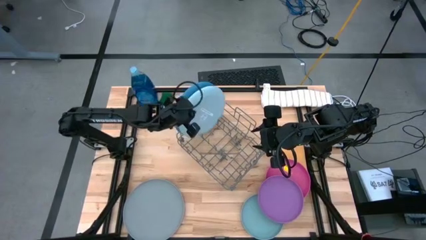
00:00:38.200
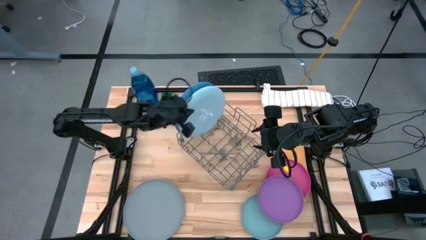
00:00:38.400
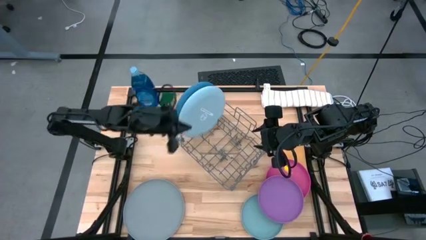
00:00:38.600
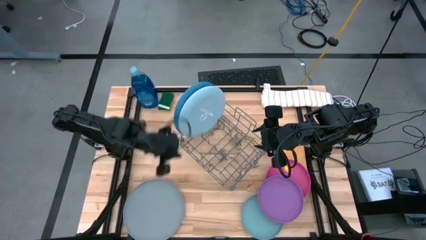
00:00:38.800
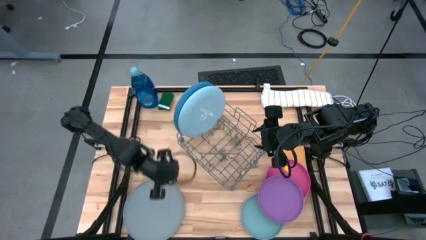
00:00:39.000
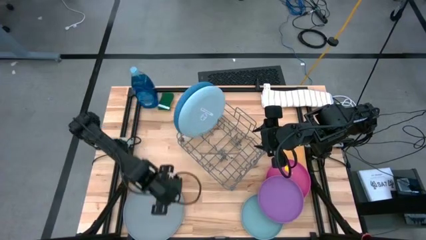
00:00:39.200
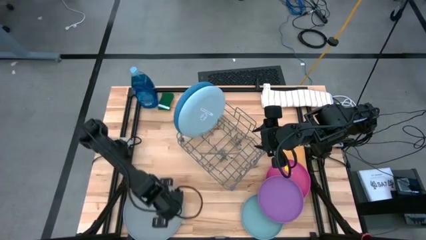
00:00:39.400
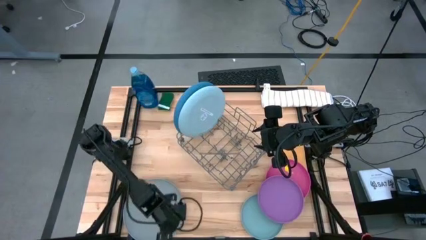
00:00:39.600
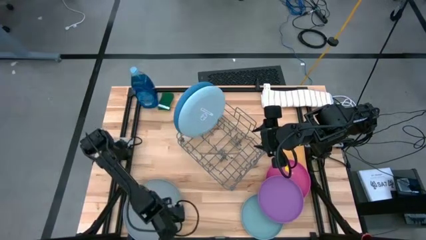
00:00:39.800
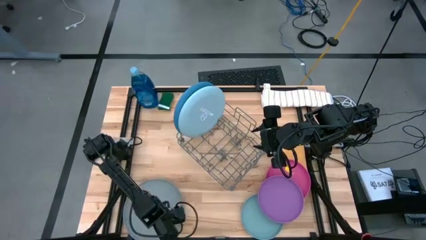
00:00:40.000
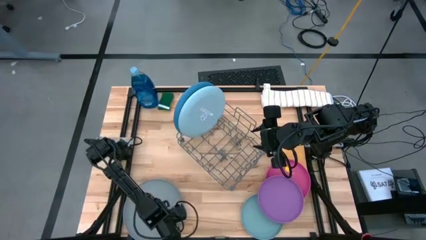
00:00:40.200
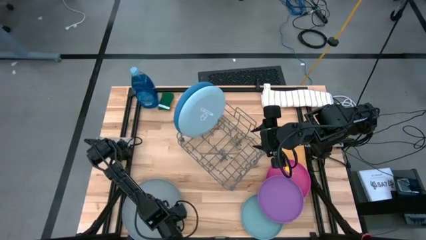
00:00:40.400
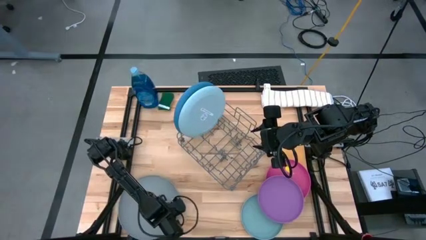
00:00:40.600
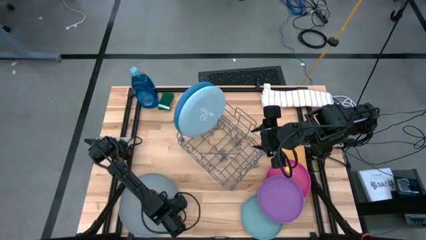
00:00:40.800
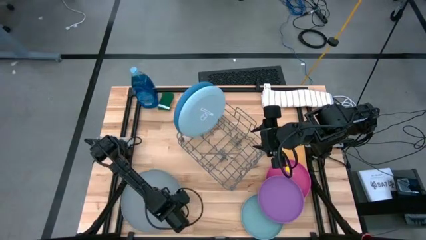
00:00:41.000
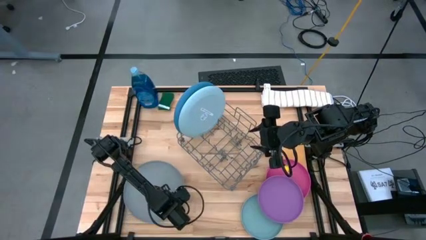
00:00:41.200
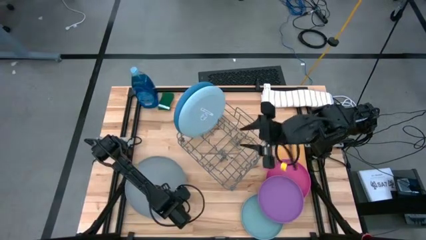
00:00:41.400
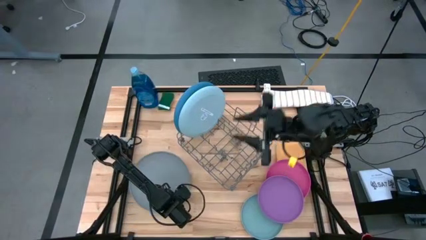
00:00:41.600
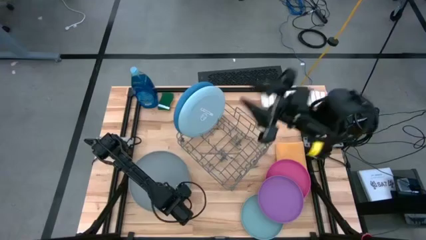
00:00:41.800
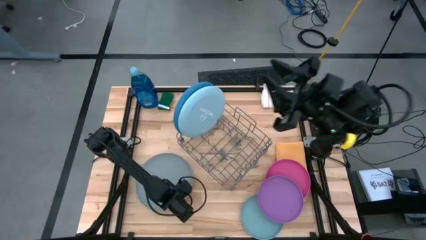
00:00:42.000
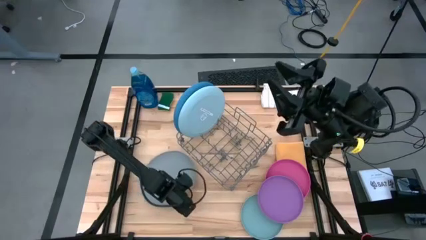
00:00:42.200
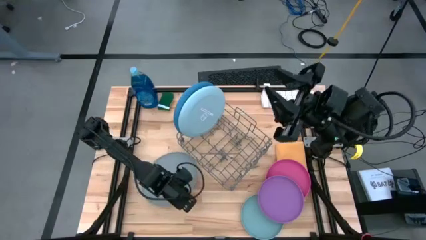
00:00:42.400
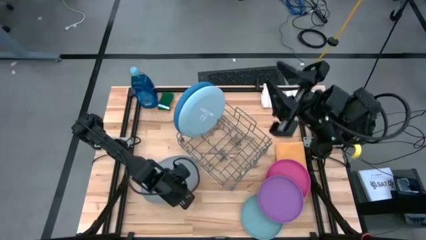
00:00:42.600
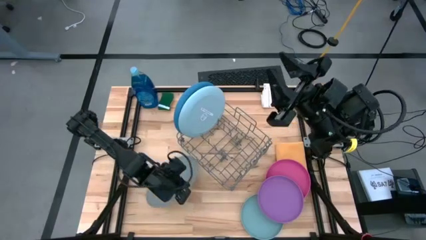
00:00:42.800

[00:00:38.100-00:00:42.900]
Task: Sort dishes
Put the big gray plate into the dish rack

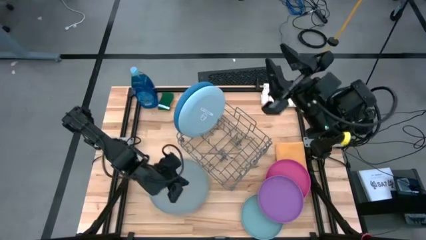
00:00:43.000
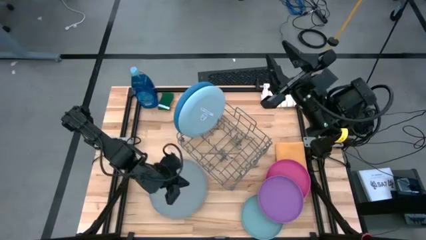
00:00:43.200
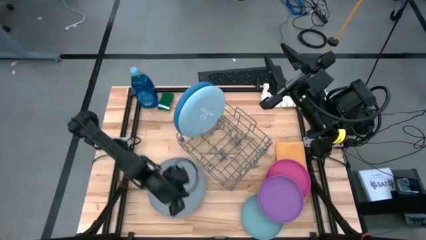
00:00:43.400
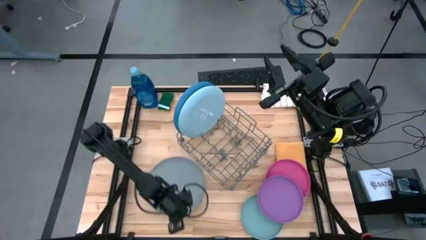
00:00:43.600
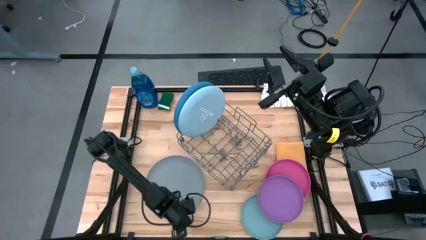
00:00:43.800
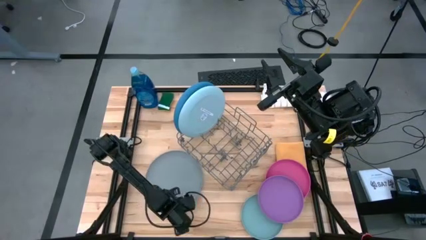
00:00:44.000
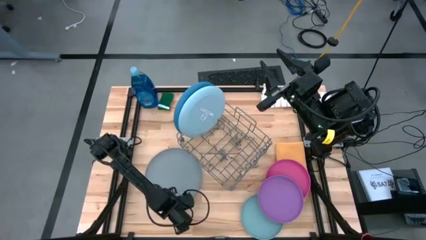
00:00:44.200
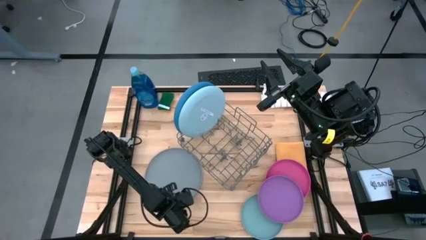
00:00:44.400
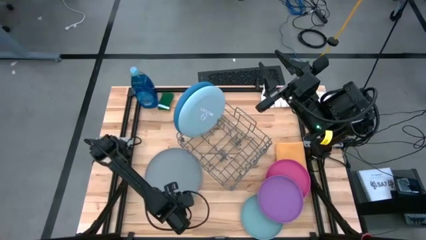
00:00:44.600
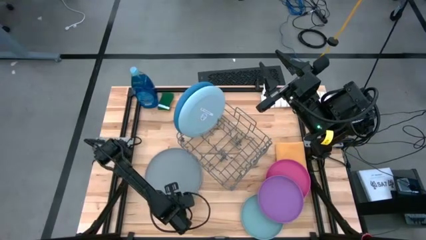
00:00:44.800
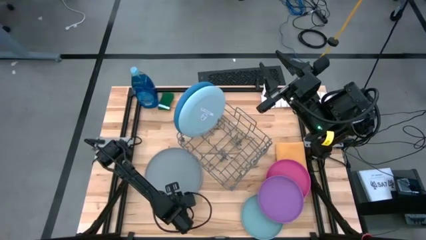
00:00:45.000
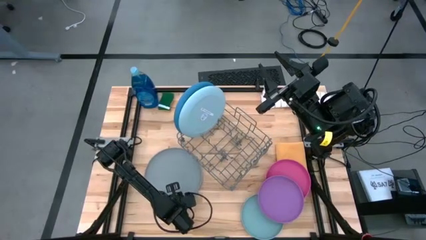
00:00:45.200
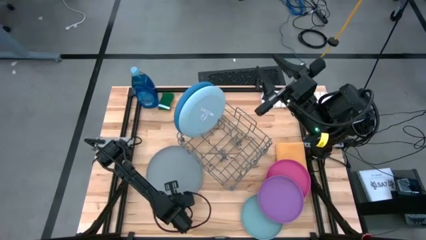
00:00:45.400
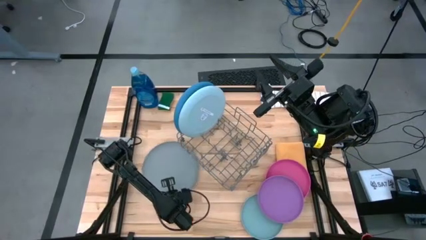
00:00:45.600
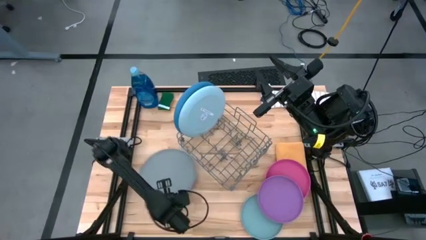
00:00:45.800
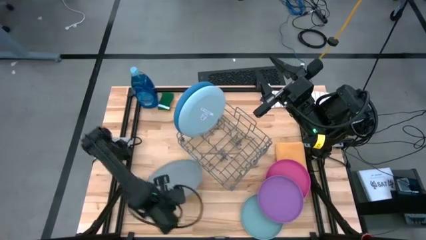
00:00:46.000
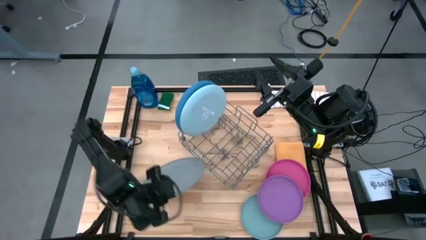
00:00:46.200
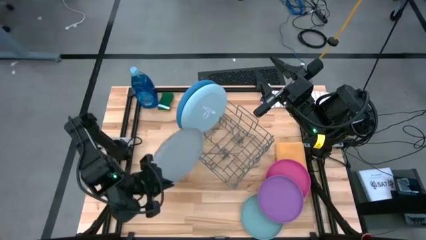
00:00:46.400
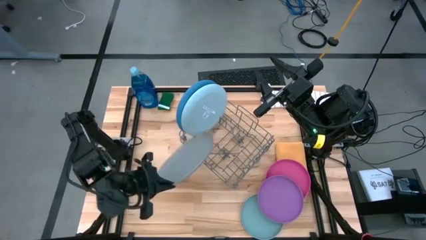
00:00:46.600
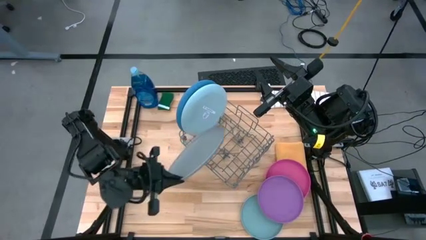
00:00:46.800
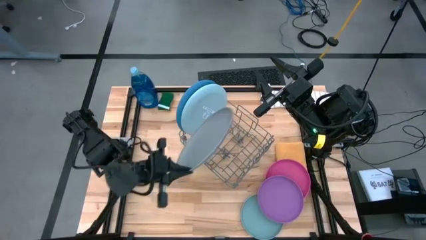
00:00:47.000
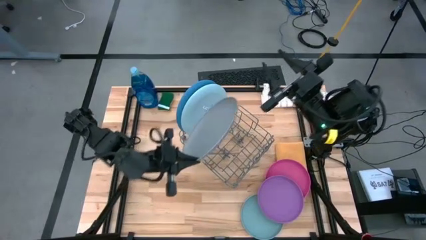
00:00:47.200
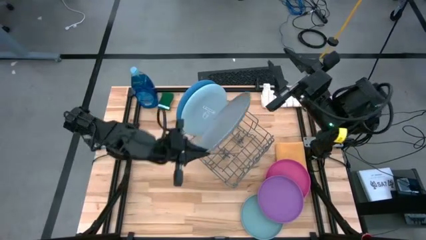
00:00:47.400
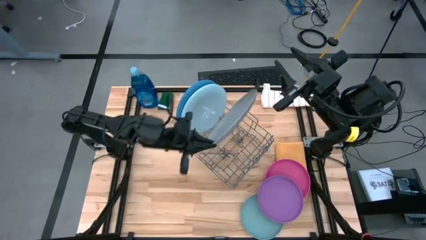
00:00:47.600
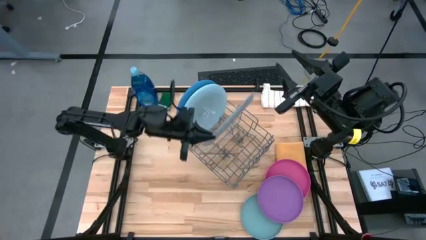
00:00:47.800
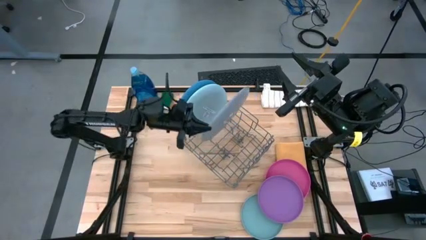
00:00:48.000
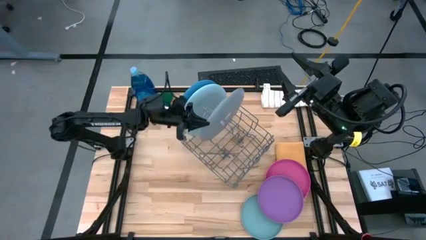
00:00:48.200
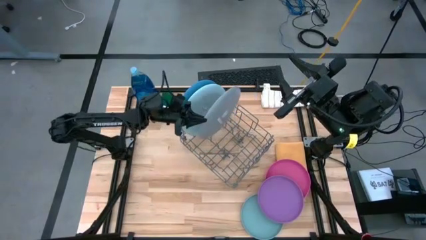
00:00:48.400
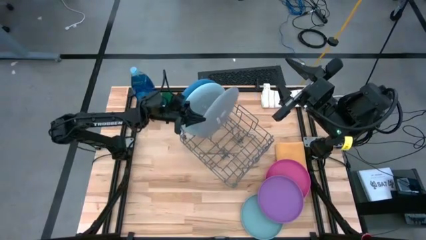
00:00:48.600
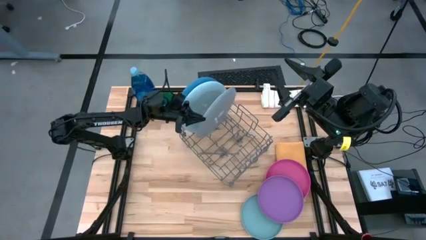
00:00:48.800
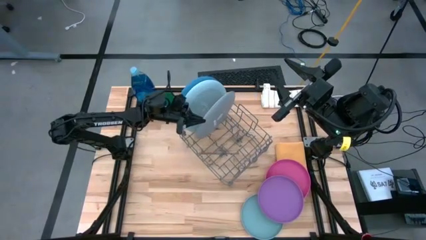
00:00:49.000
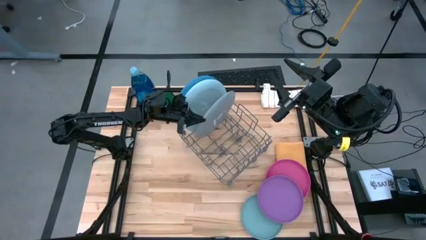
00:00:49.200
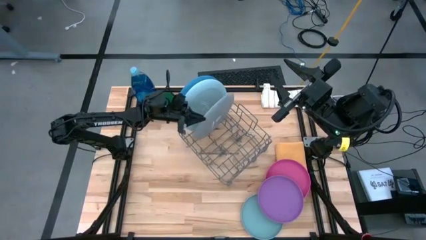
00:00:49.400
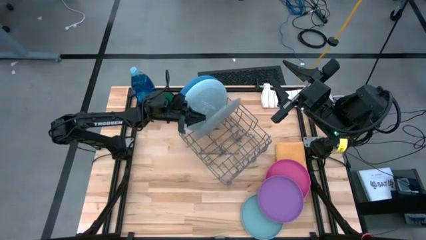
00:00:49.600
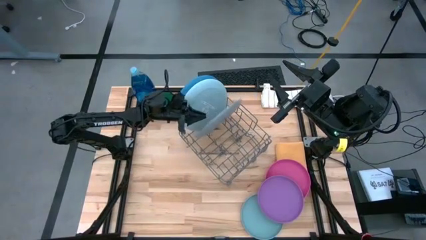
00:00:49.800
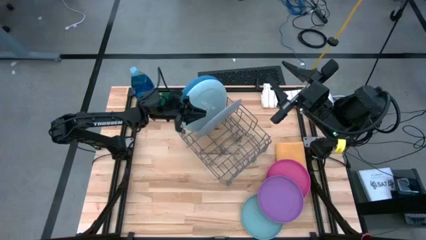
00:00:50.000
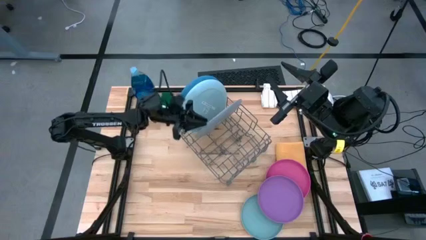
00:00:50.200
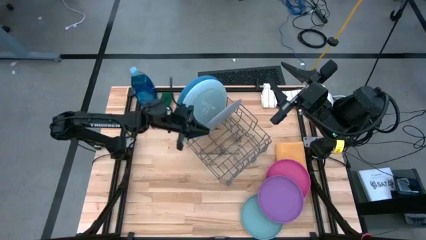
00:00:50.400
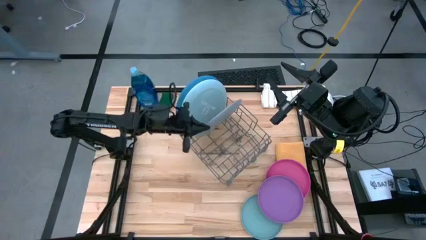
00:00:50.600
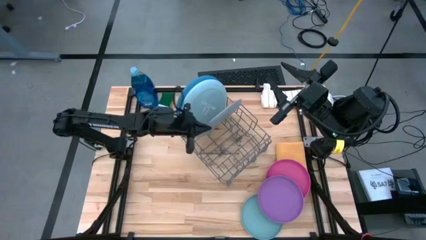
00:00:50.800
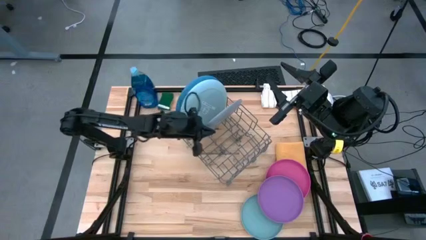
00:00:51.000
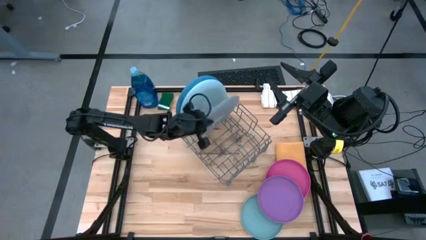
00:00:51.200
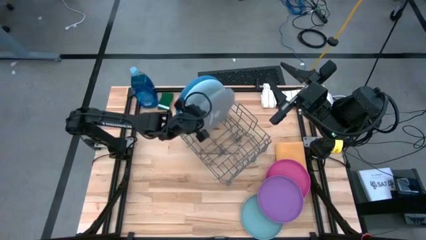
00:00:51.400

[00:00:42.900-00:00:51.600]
Put the big gray plate into the dish rack

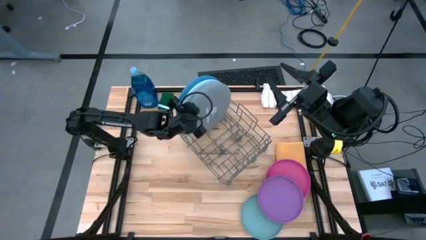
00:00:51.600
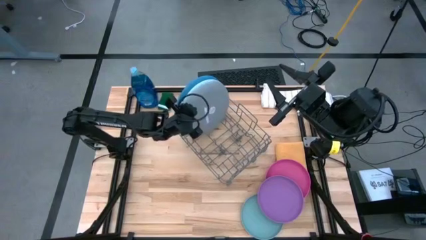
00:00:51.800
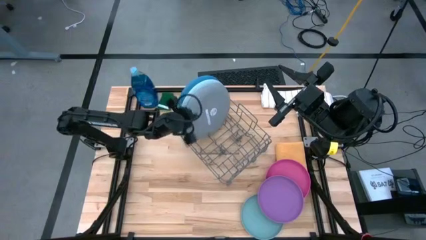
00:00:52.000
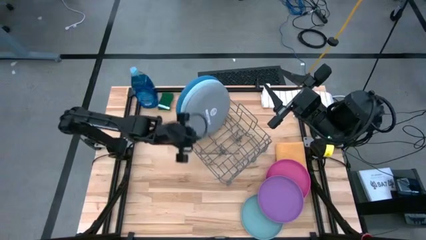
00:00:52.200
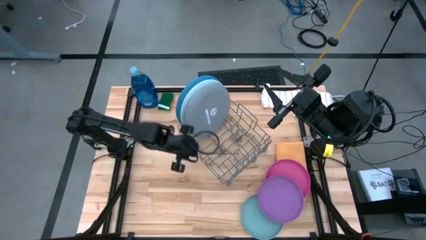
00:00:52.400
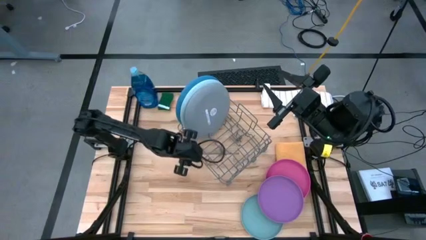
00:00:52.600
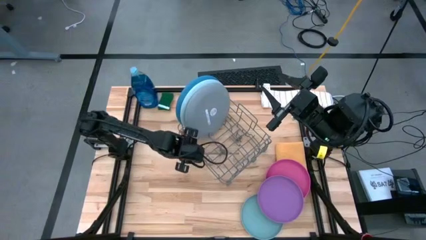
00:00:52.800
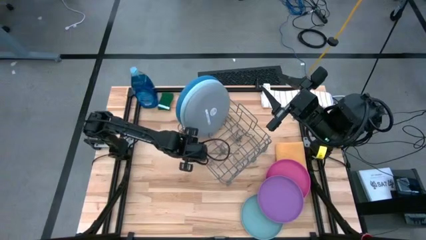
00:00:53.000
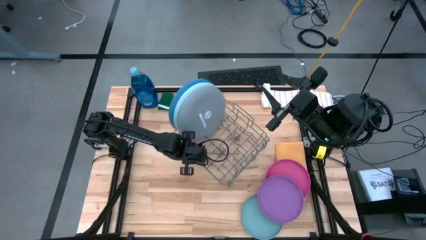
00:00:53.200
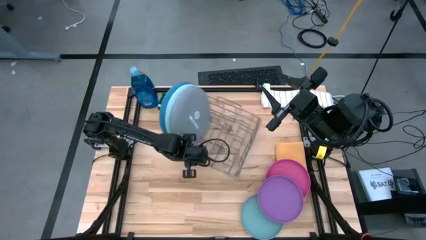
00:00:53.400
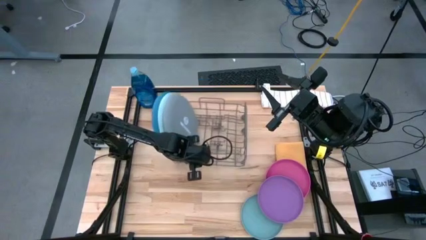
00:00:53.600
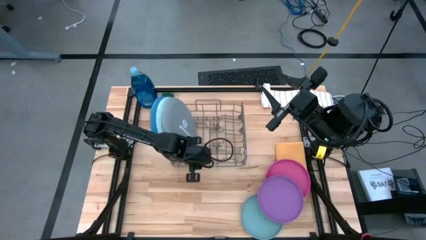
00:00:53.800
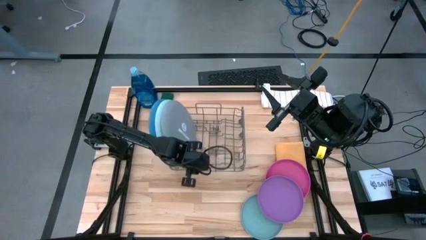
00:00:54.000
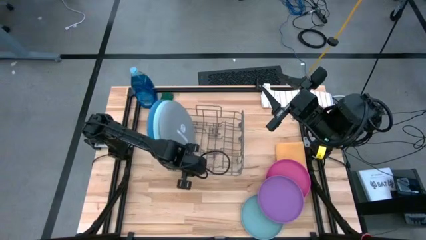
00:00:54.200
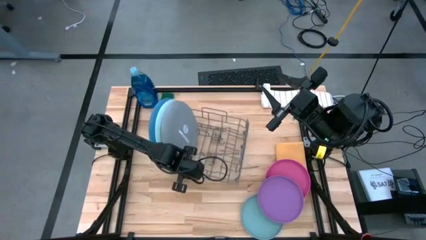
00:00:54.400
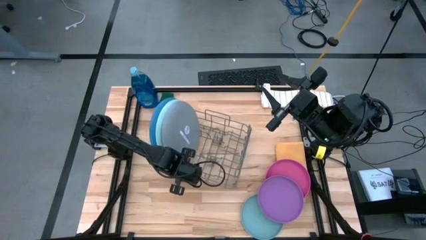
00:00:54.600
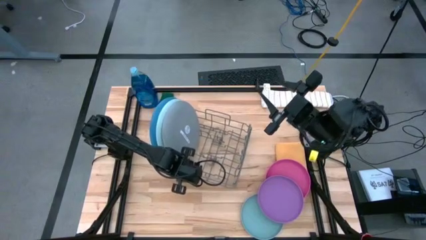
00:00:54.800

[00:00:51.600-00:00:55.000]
Adjust the dish rack
